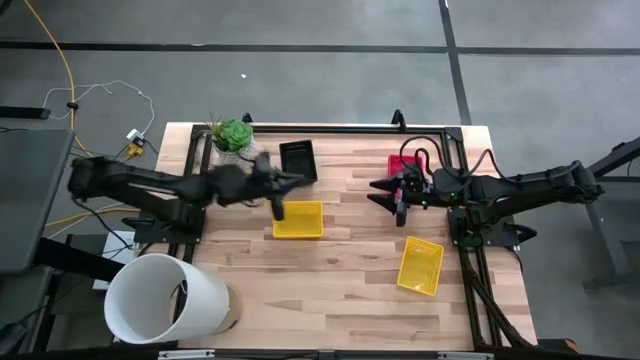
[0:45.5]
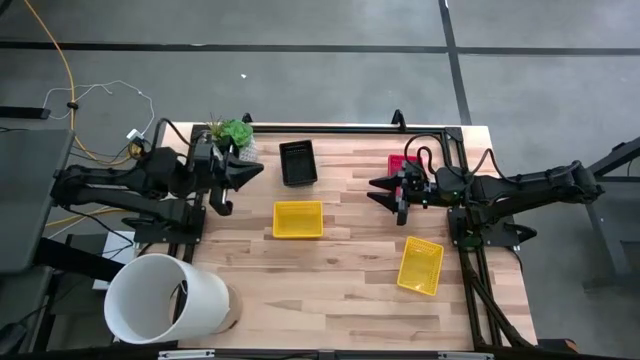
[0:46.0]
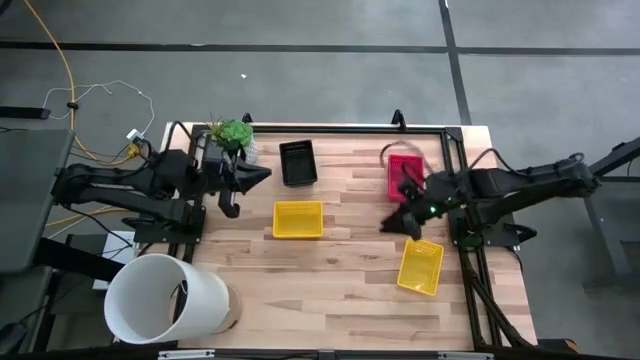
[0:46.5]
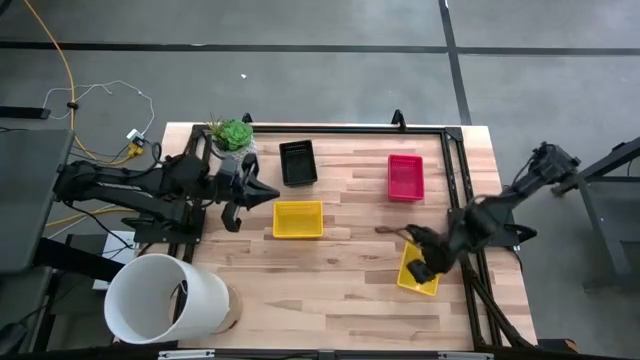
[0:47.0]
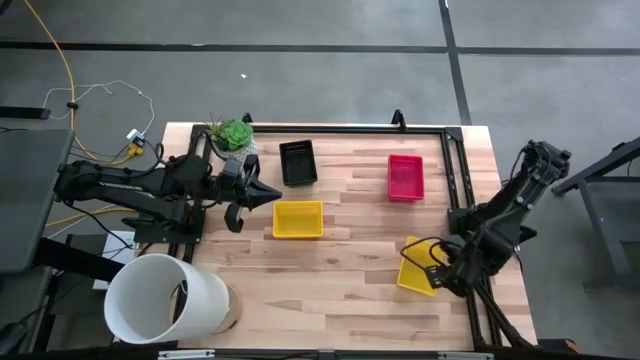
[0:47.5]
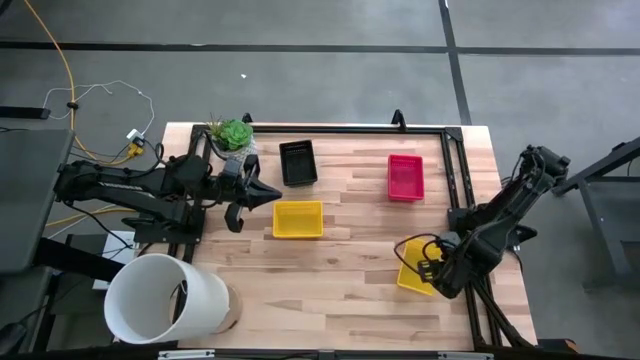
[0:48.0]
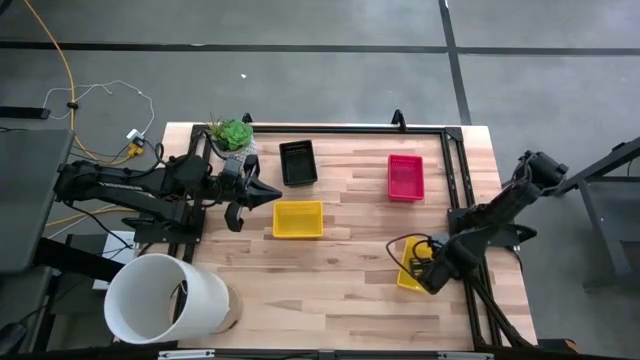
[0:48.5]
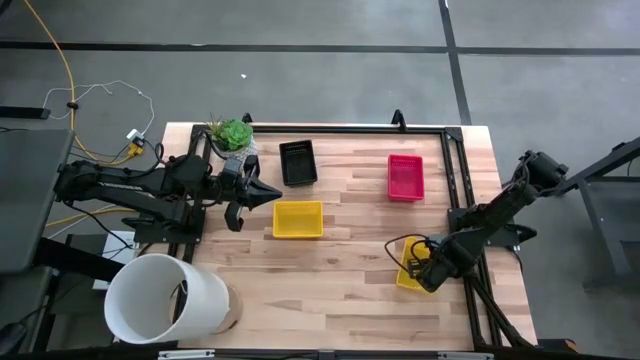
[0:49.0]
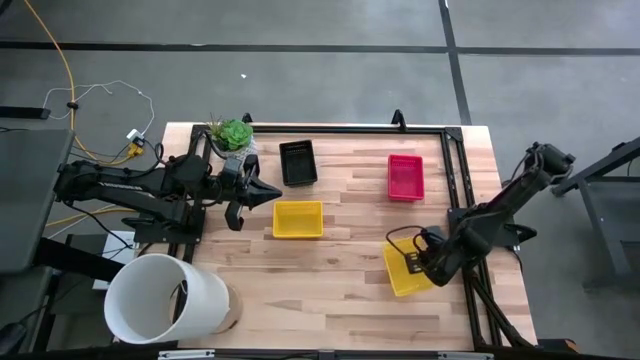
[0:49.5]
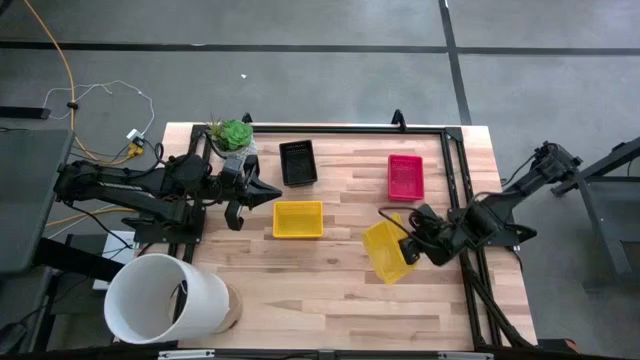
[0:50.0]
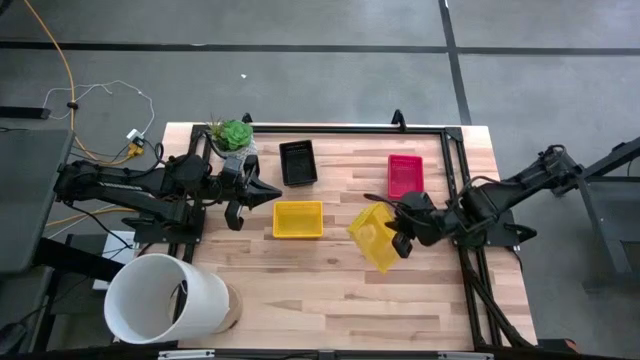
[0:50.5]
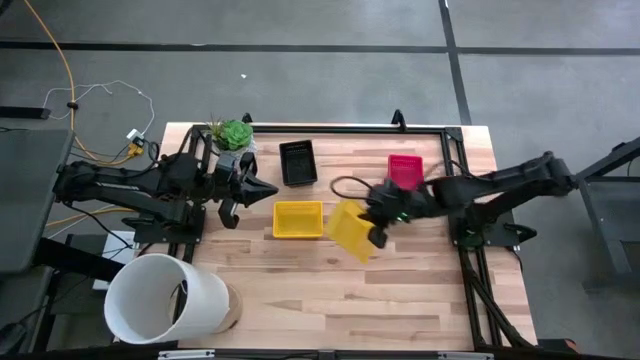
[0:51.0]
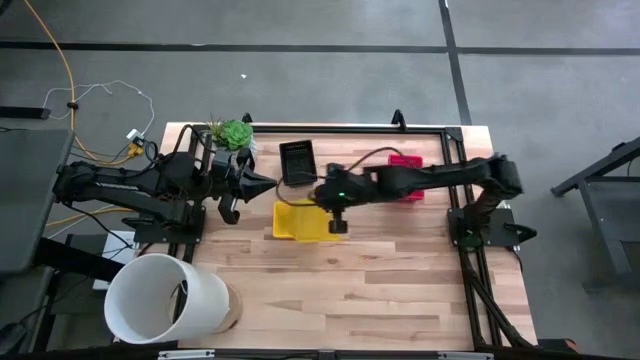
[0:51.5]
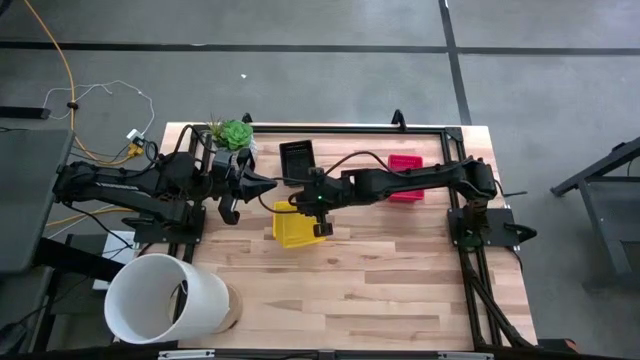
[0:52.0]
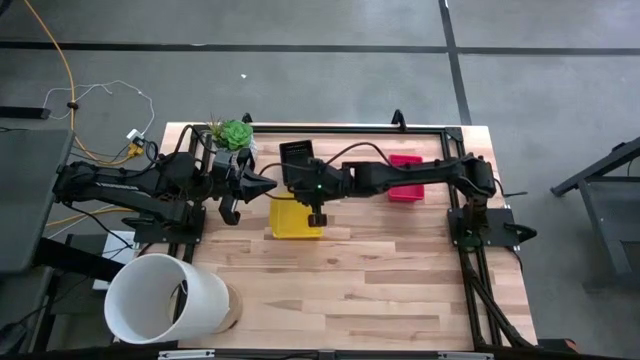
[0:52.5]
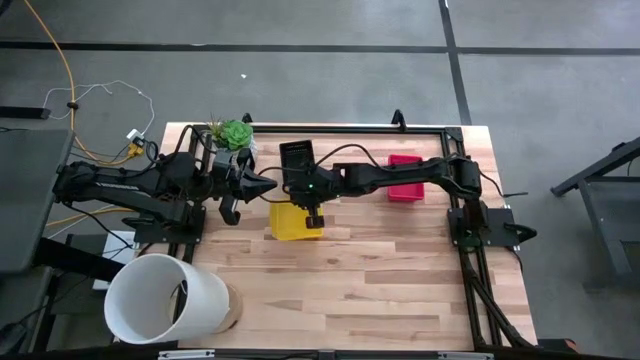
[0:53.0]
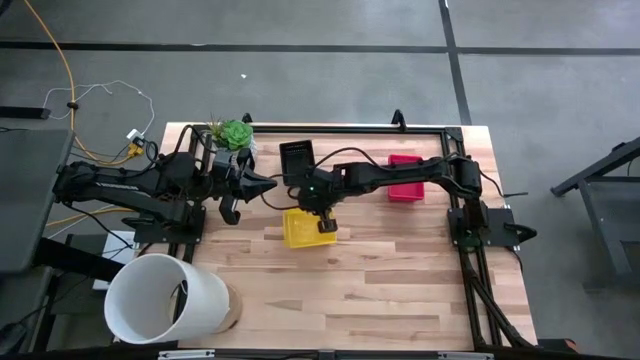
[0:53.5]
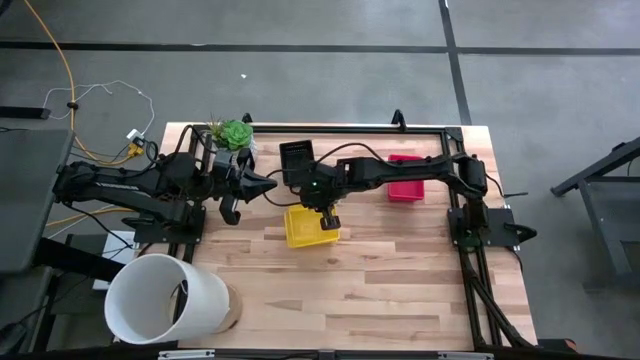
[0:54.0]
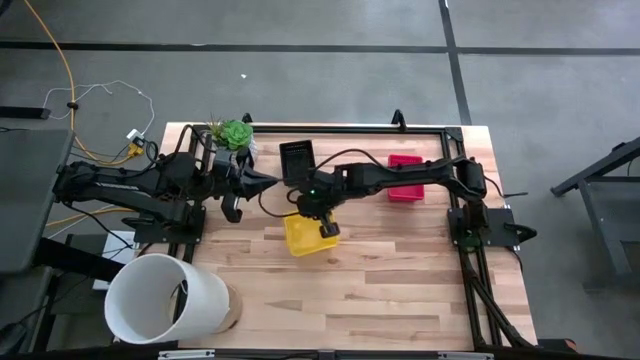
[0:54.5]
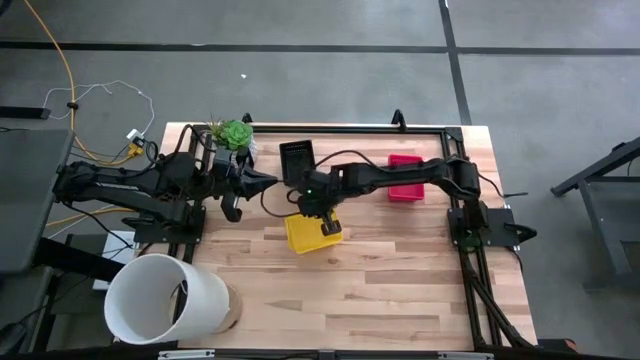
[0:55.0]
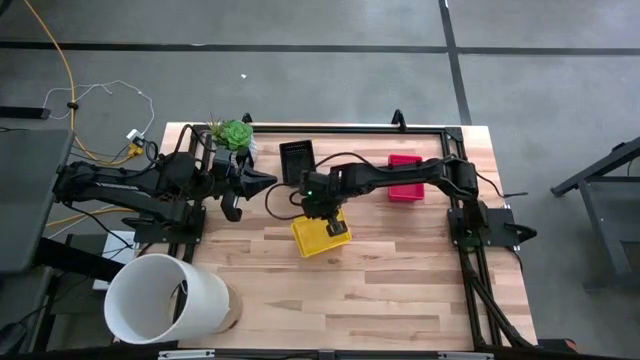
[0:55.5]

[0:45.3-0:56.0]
Stack the yellow bin on the top of the yellow bin

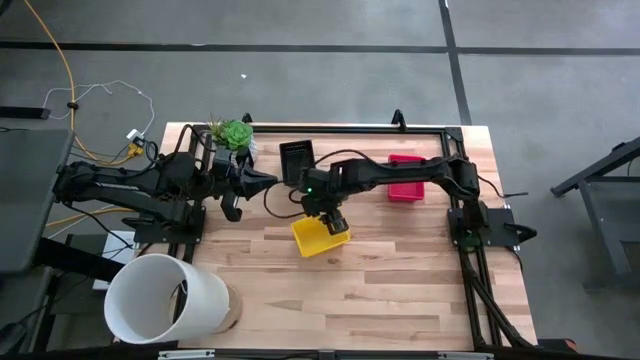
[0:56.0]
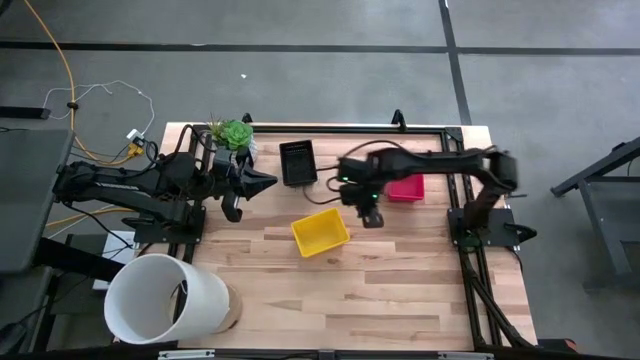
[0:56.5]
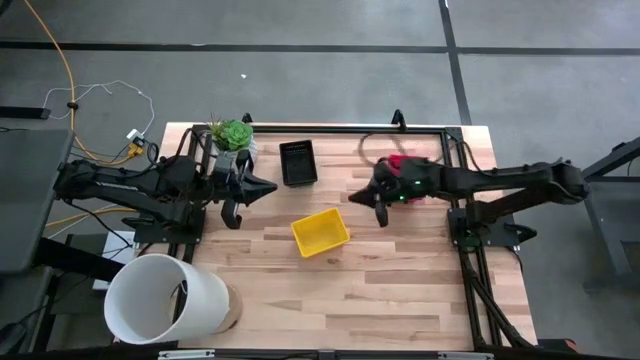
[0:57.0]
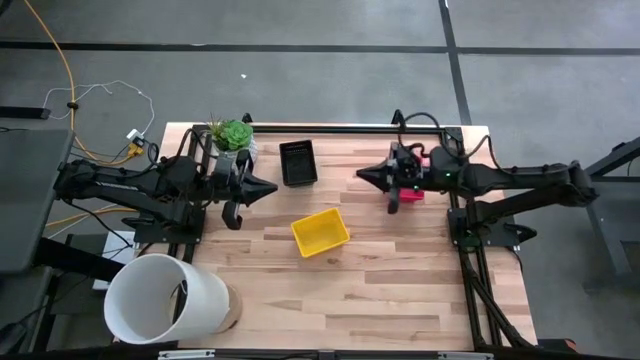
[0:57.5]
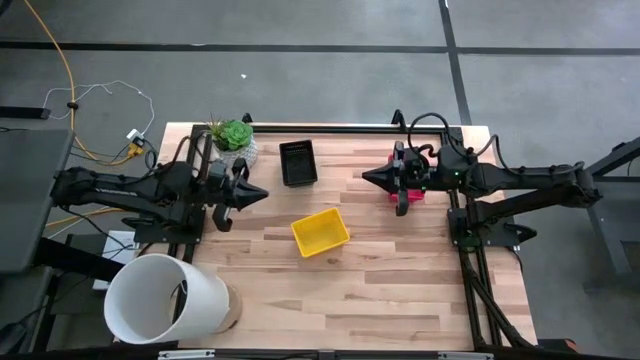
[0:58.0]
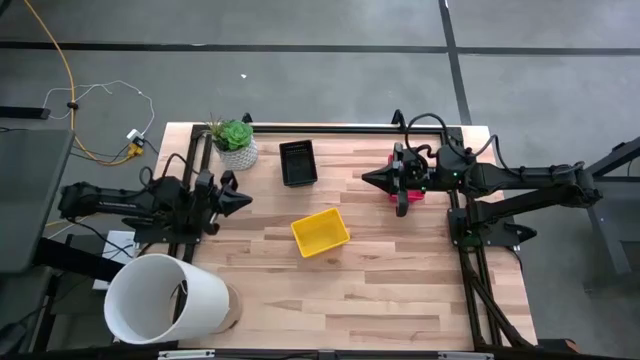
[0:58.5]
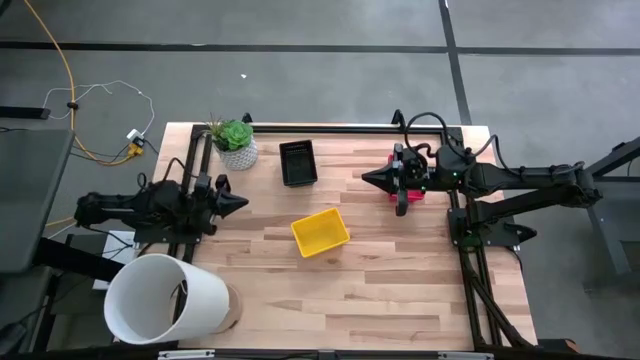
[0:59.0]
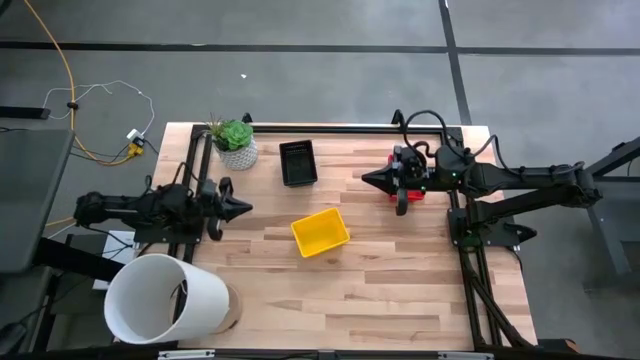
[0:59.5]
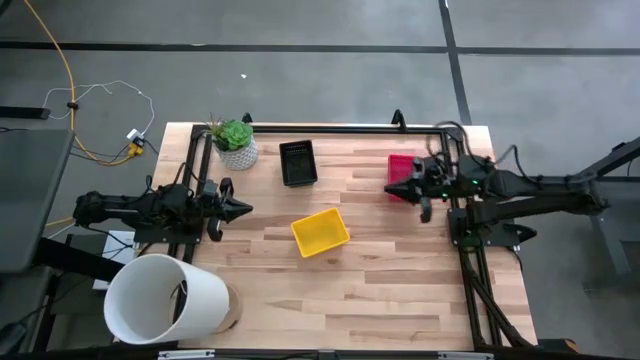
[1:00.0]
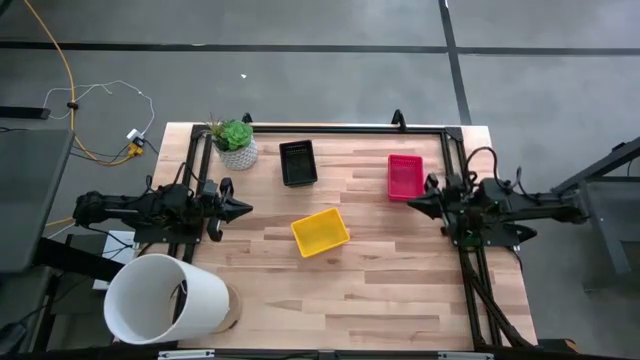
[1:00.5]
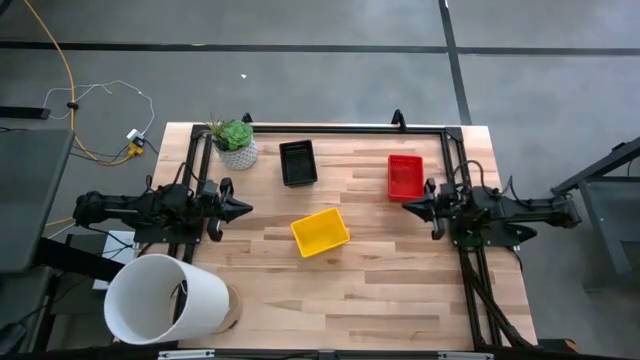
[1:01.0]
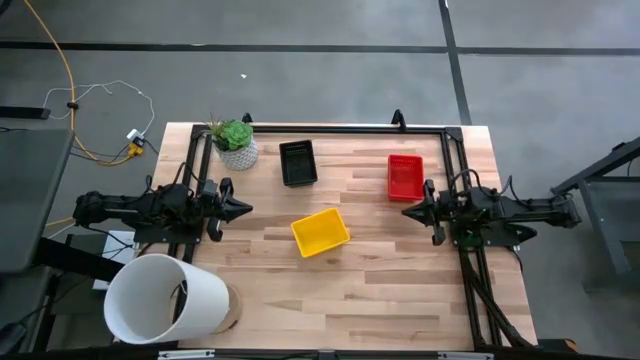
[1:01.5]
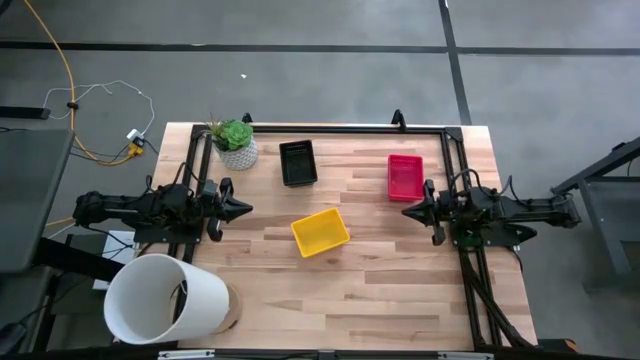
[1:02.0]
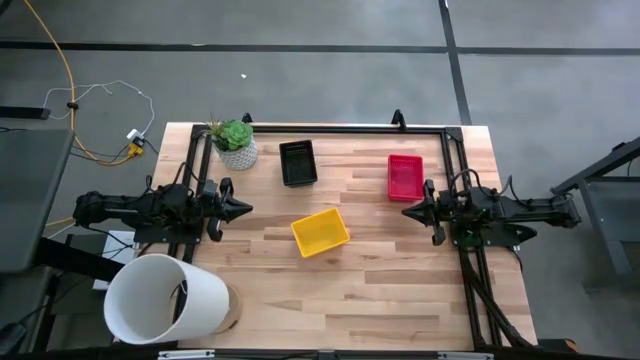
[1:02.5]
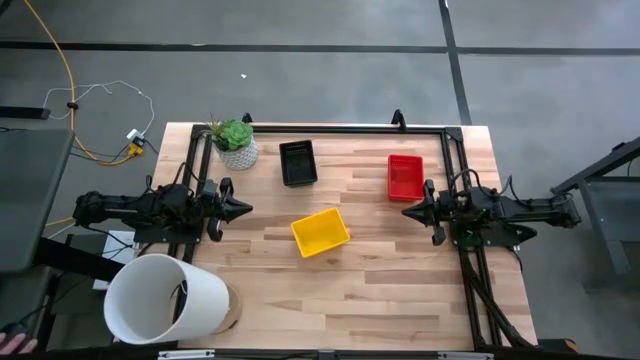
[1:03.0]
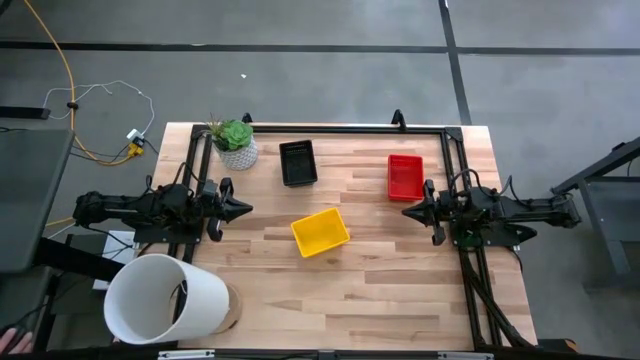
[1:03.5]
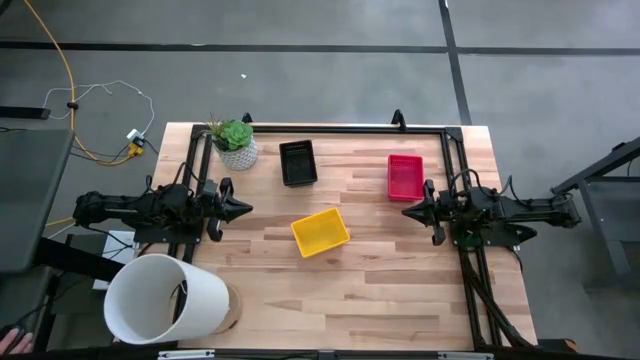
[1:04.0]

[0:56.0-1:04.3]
Return to Home Position
